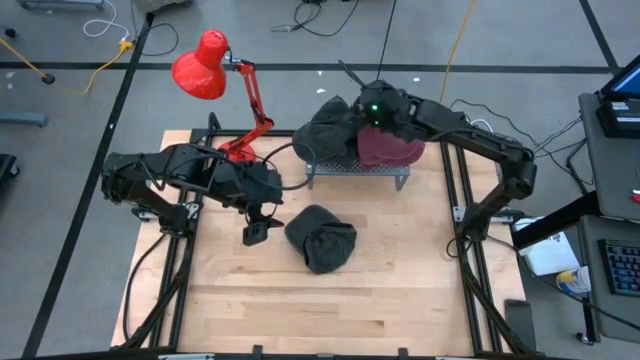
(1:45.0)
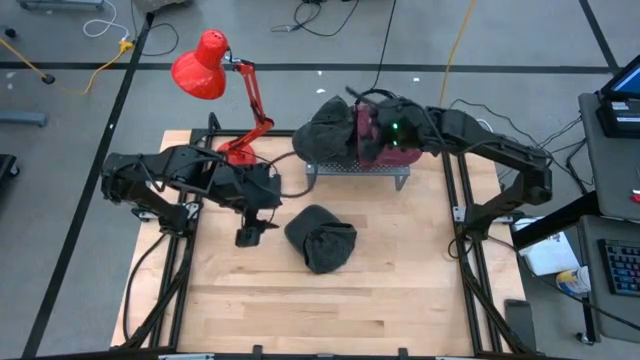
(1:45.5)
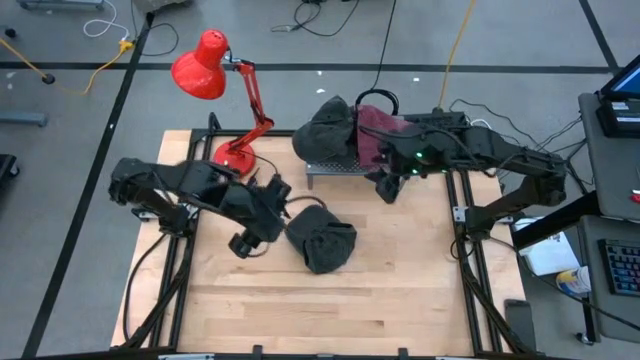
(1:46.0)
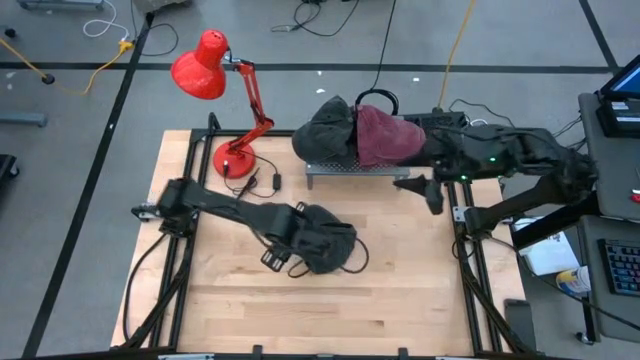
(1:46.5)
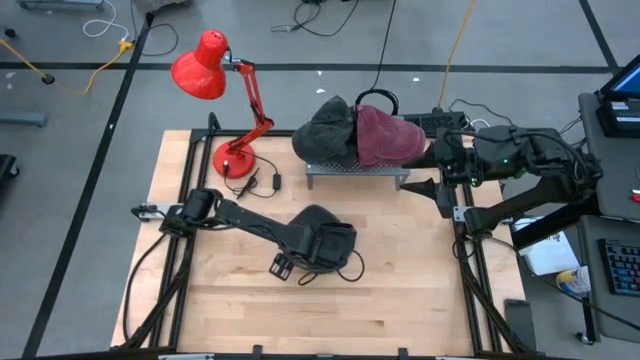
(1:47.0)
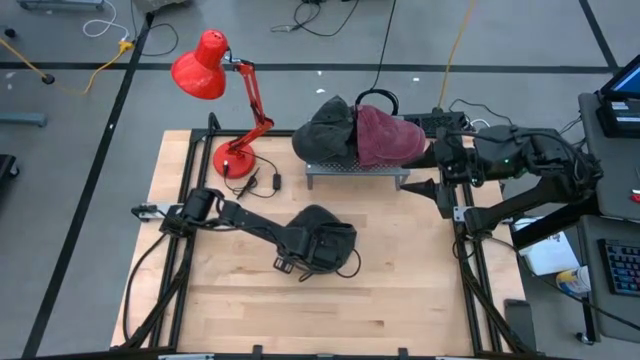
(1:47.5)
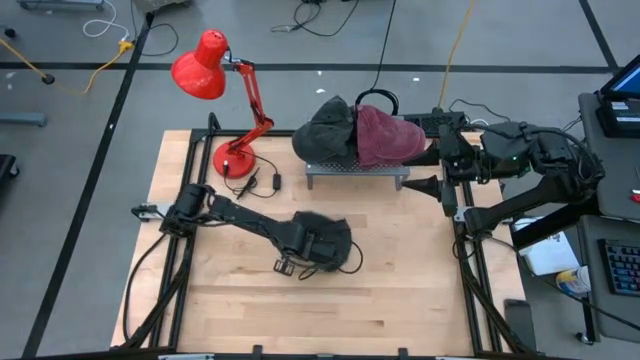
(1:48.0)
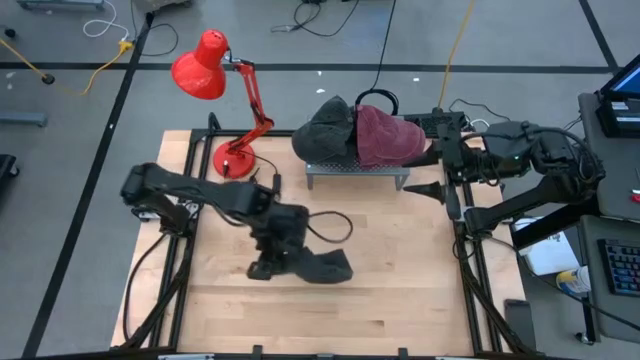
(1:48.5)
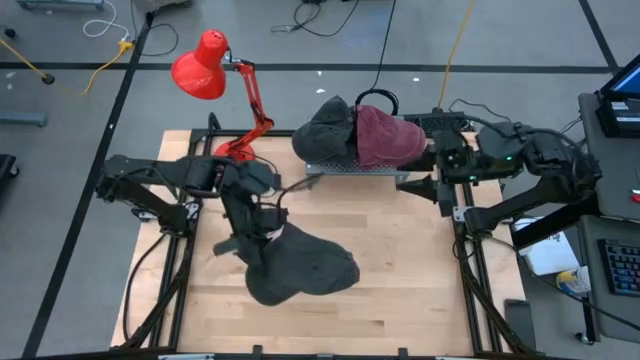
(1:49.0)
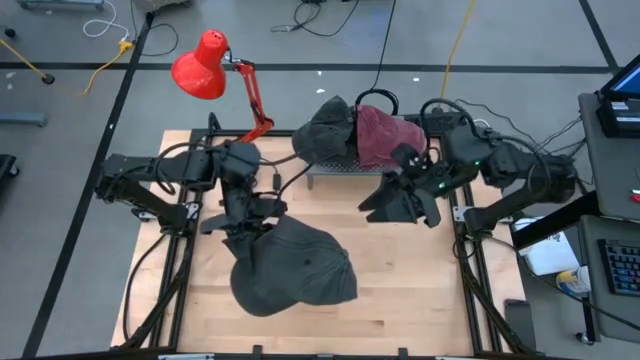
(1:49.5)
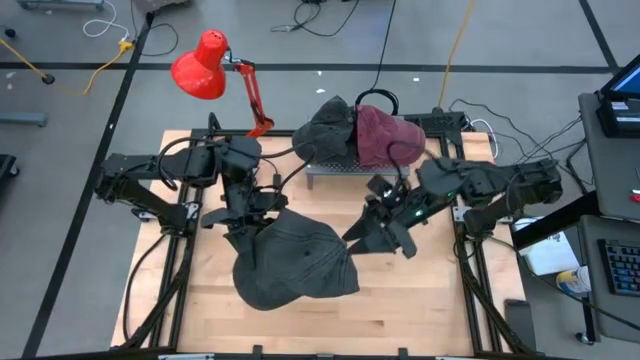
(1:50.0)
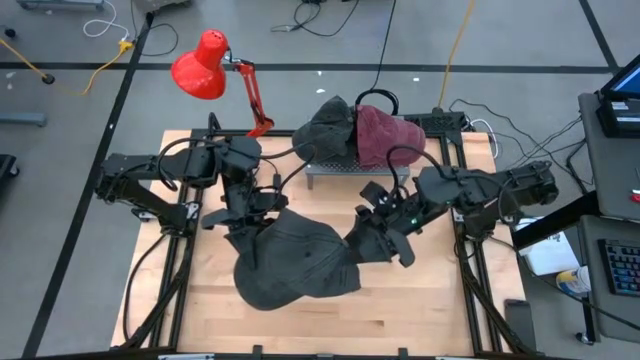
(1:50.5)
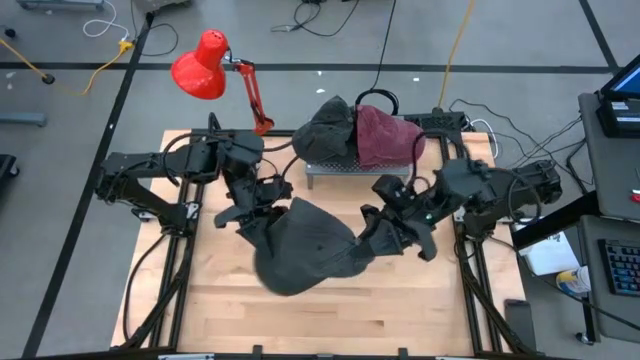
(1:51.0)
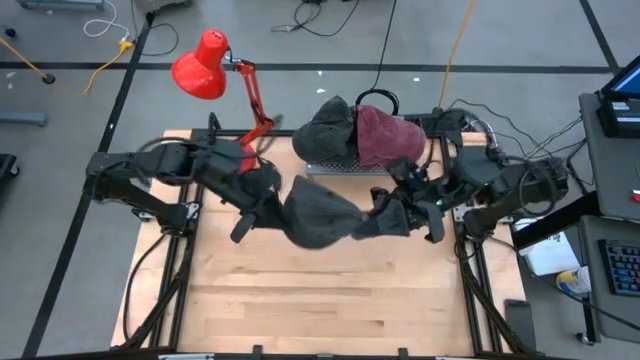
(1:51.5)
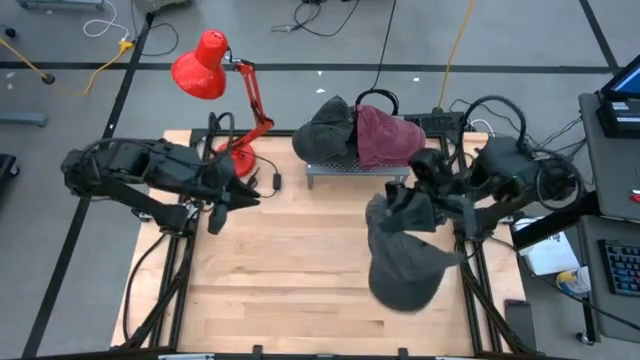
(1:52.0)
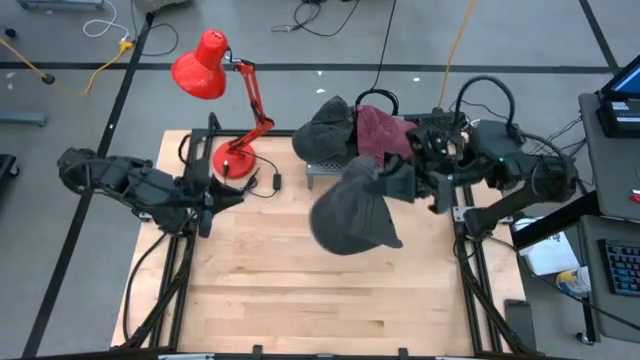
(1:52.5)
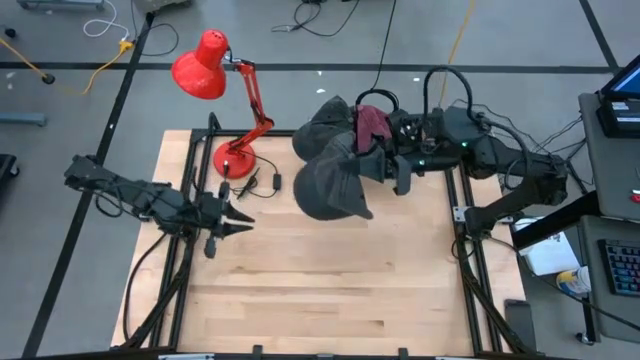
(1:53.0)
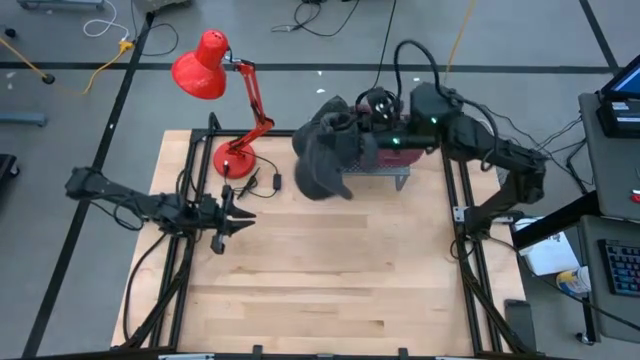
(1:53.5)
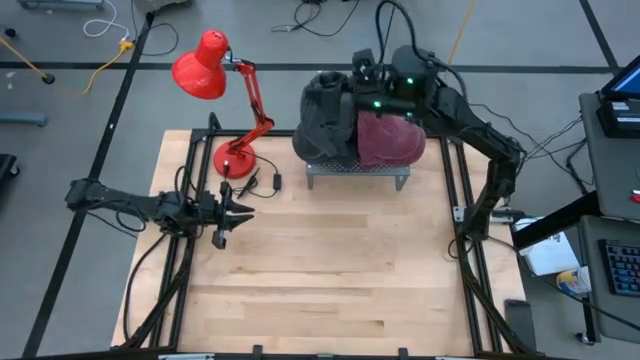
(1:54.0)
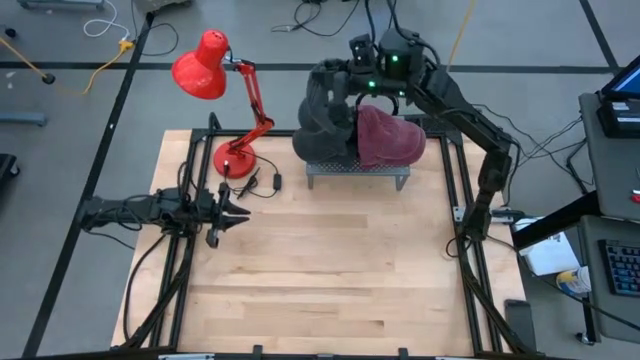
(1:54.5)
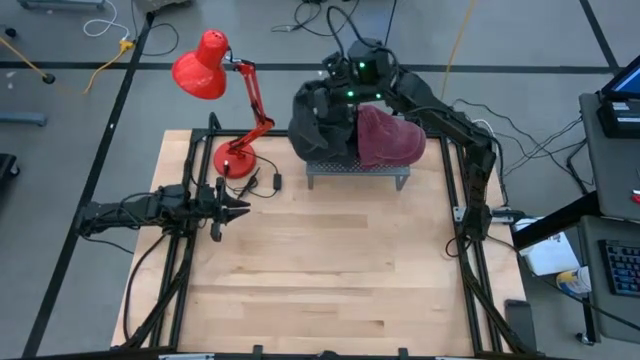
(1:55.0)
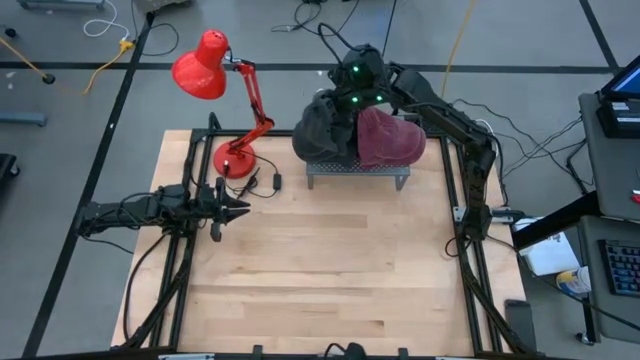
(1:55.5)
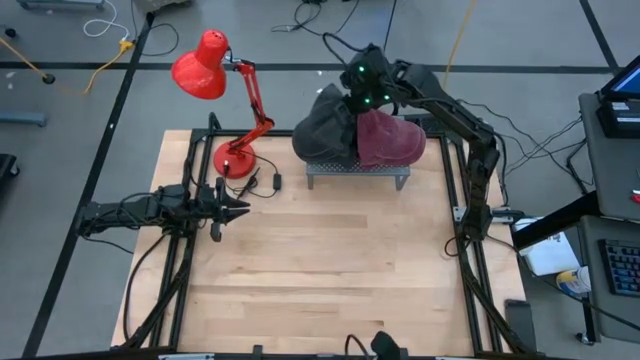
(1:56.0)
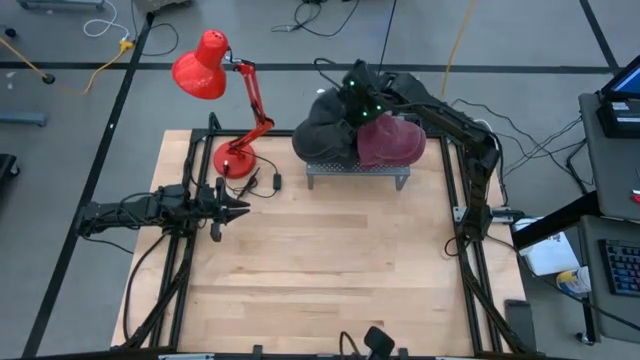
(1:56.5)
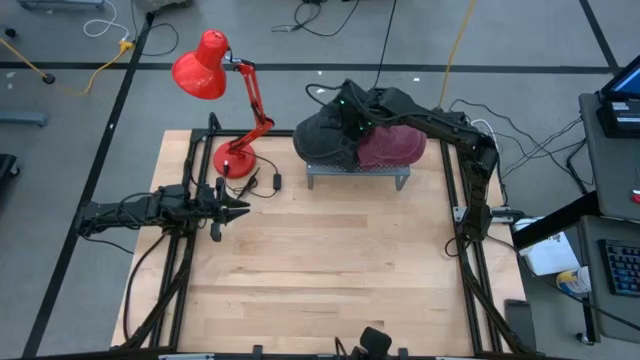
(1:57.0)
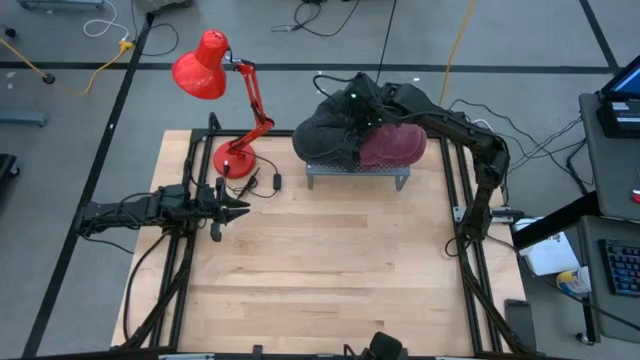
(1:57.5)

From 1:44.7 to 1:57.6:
Task: Pick & Place hat
Stack the black cap on the black cap on the shelf

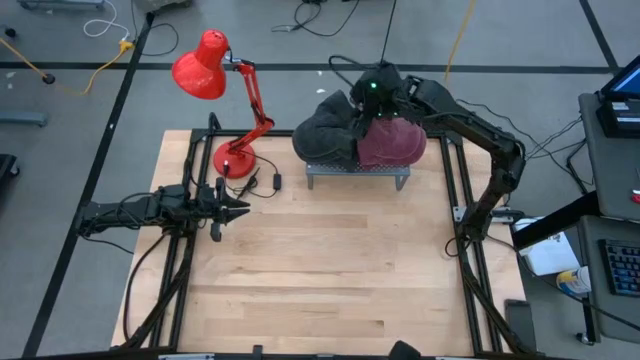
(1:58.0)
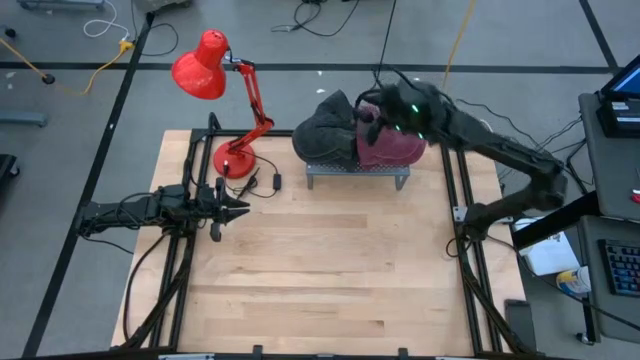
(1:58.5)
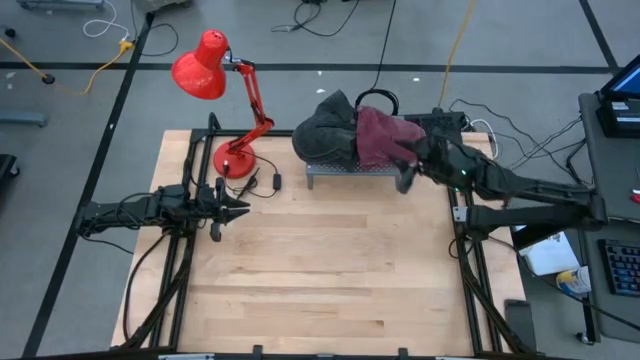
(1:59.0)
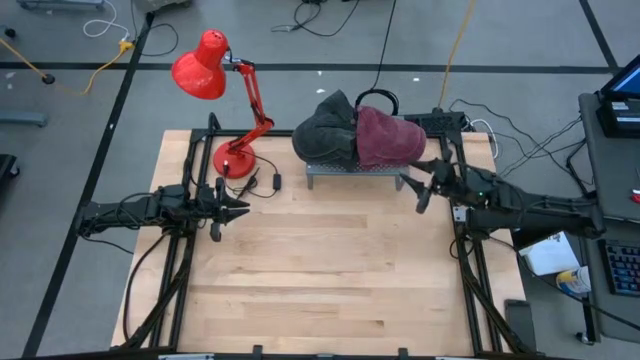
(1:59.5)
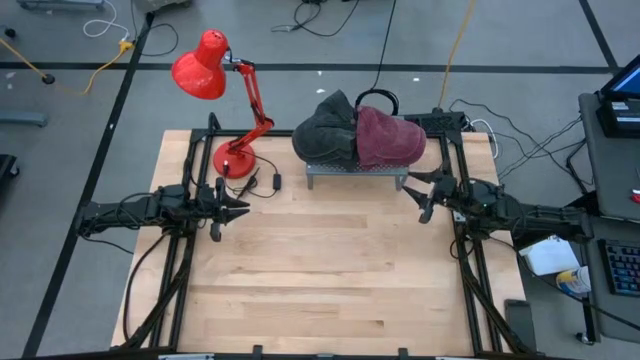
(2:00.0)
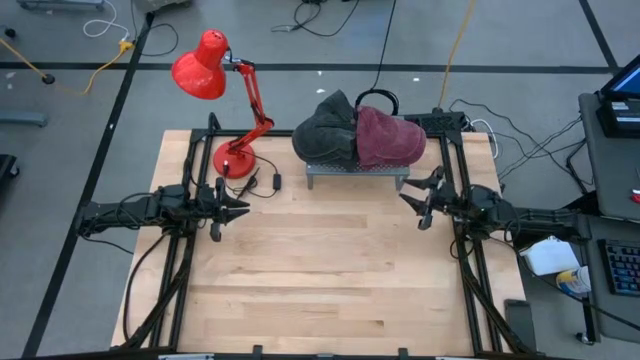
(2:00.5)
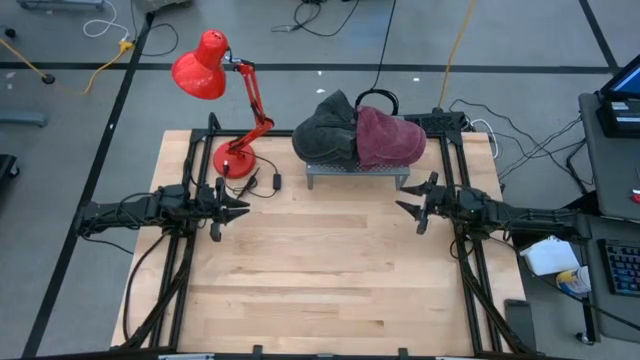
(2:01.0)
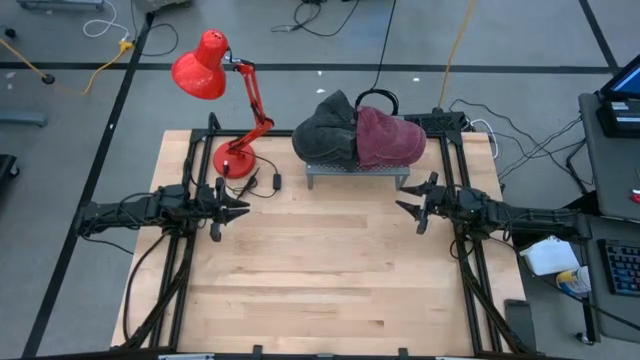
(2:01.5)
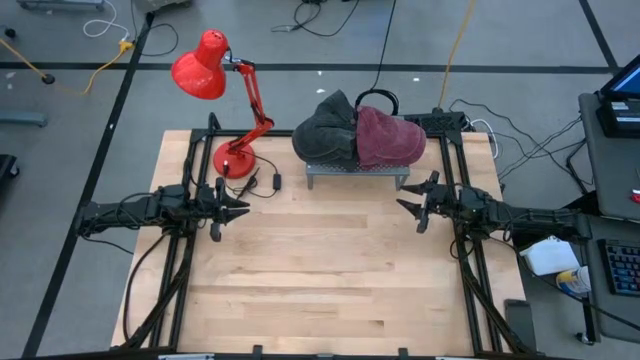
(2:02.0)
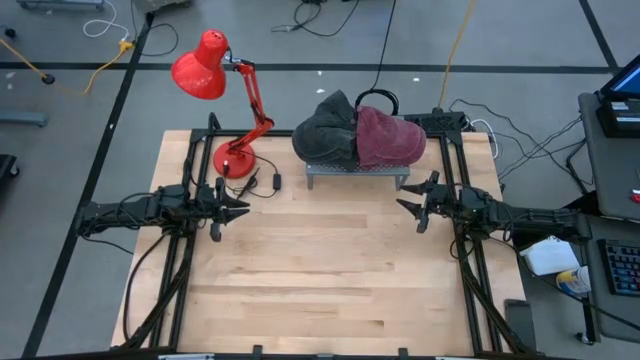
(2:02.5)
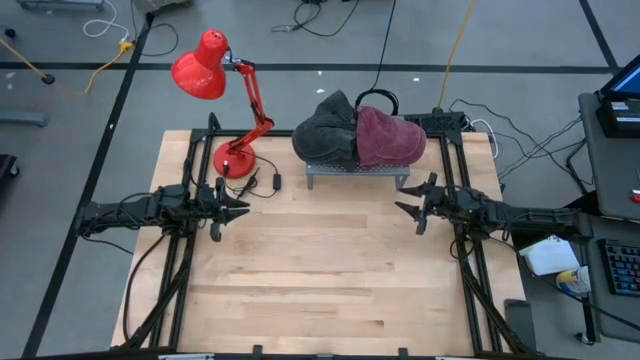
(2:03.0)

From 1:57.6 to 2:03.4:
Return to Home Position

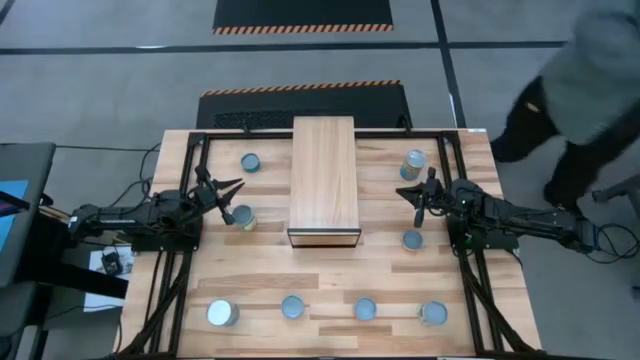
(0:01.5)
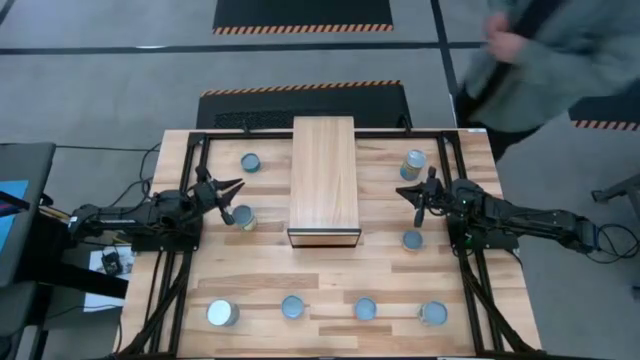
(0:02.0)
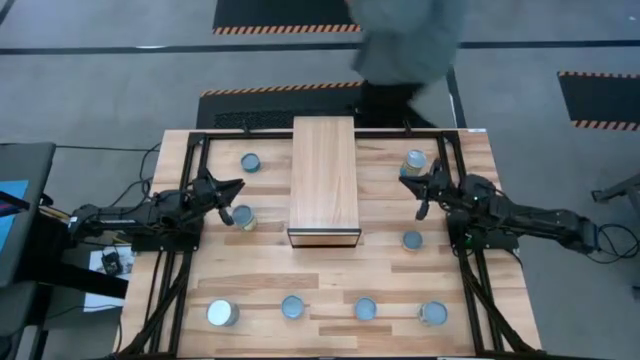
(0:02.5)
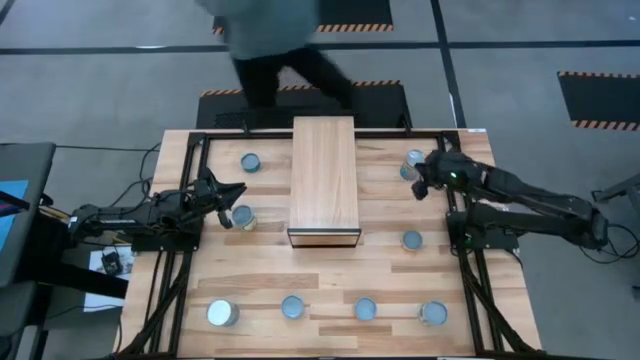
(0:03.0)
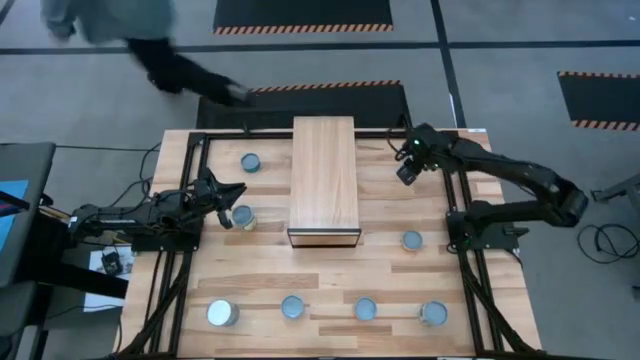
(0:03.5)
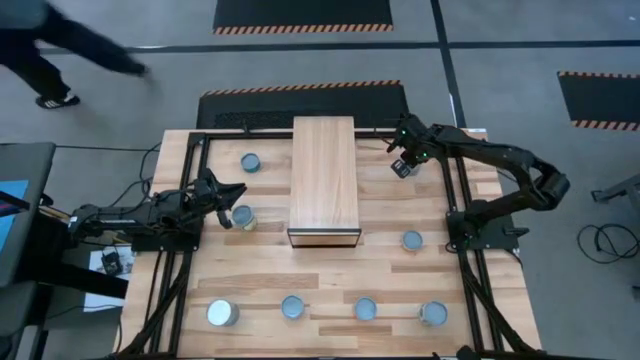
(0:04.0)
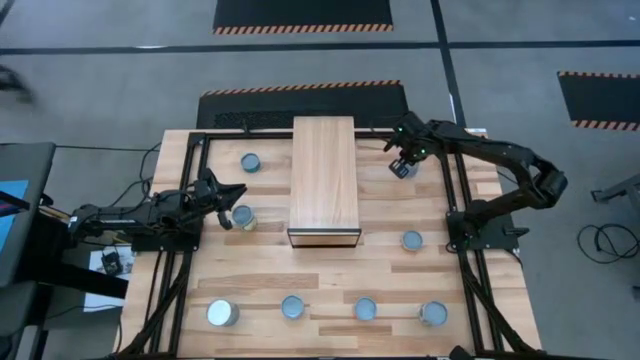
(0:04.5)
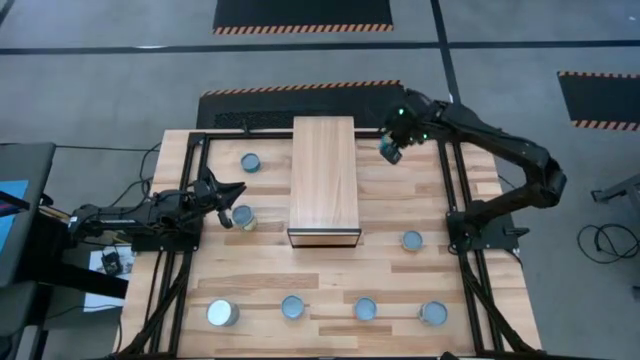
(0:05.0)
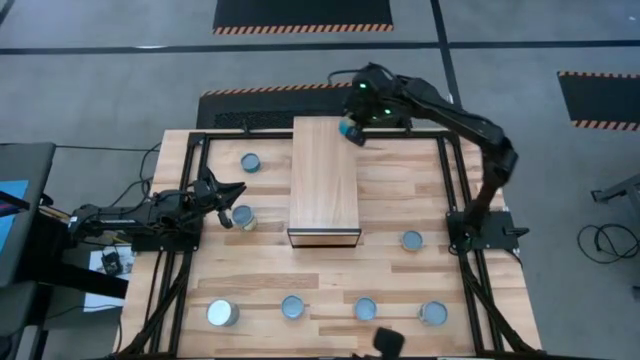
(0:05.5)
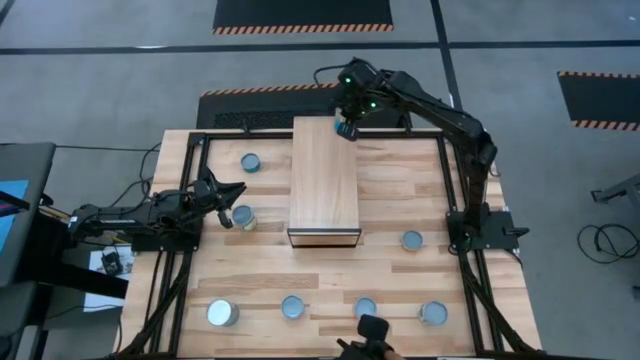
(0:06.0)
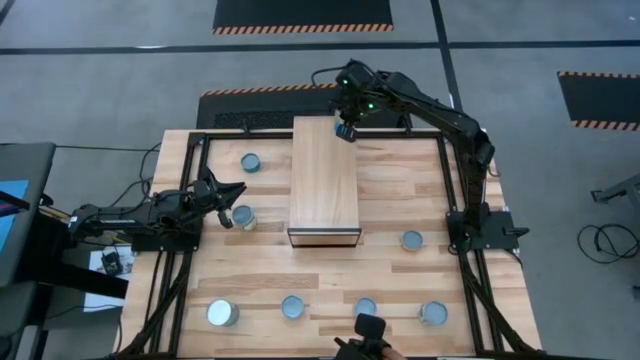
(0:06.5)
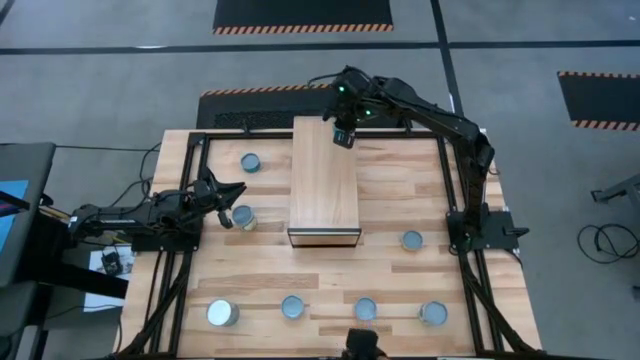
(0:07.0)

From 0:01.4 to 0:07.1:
Task: Pick and place cans onto a shelf
Put the canned cherries soup on the shelf
